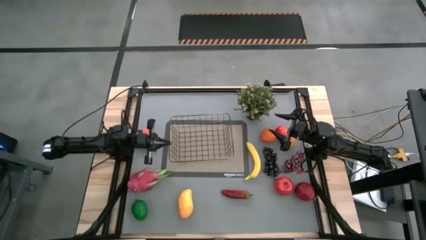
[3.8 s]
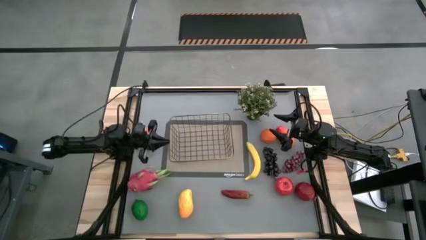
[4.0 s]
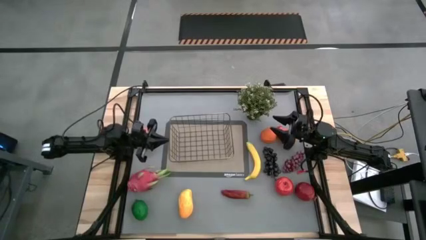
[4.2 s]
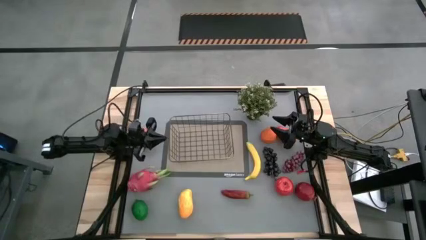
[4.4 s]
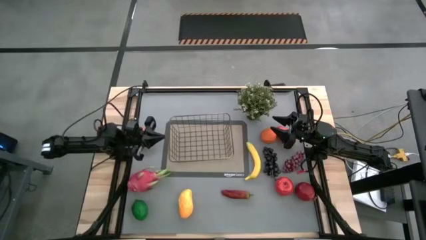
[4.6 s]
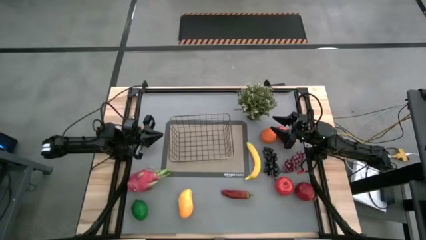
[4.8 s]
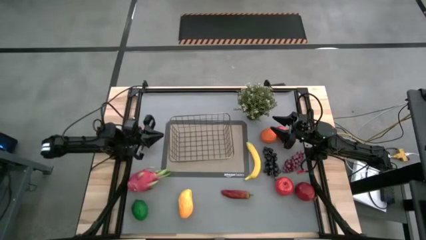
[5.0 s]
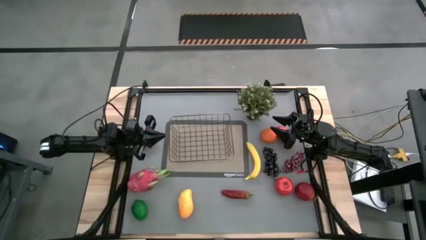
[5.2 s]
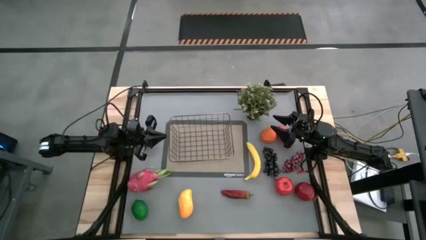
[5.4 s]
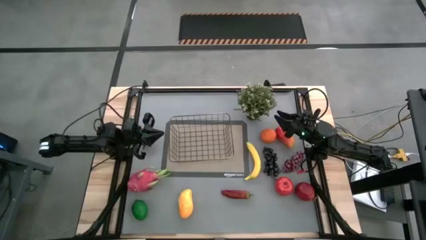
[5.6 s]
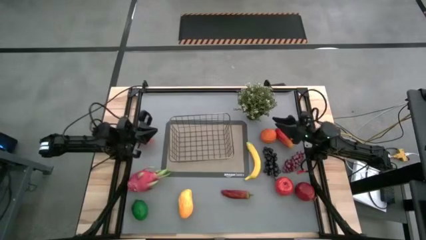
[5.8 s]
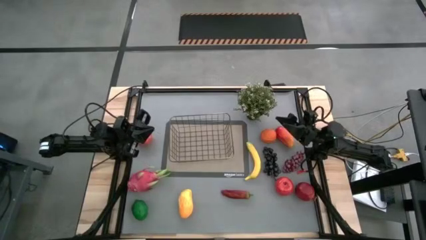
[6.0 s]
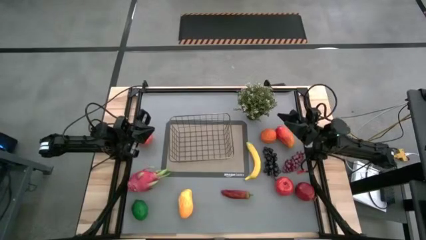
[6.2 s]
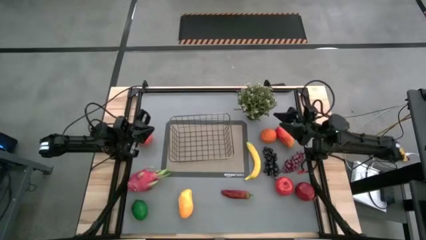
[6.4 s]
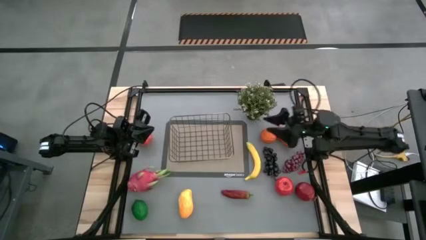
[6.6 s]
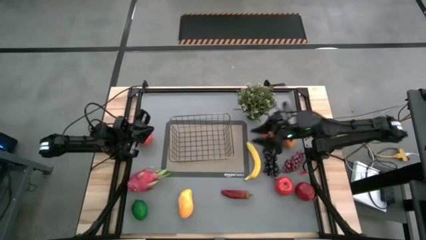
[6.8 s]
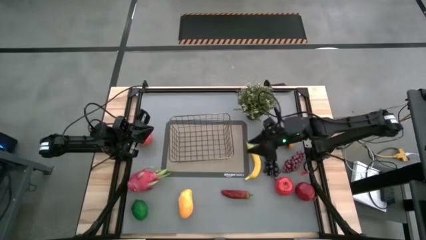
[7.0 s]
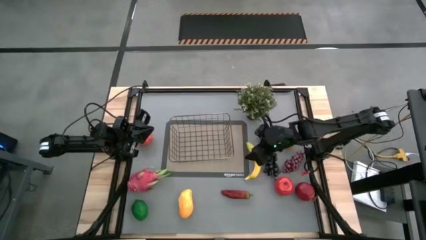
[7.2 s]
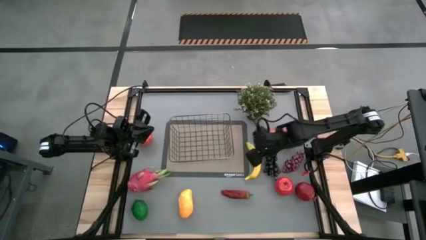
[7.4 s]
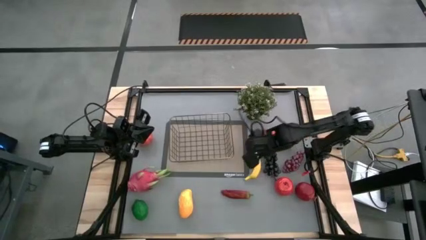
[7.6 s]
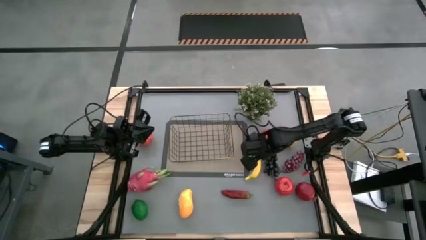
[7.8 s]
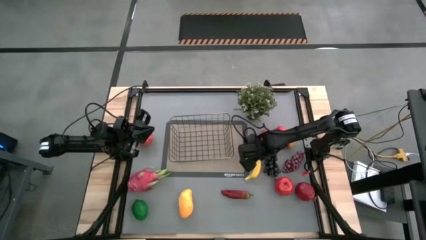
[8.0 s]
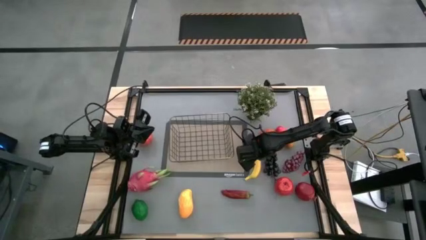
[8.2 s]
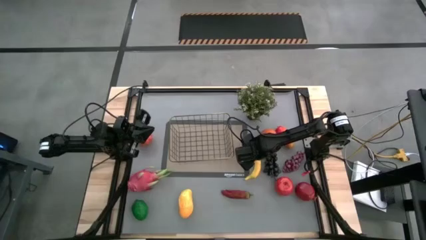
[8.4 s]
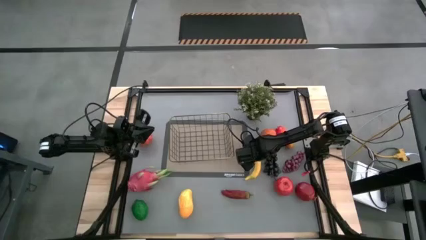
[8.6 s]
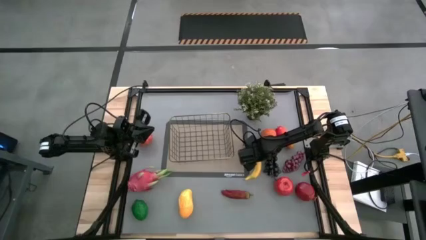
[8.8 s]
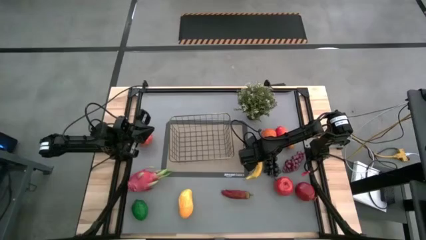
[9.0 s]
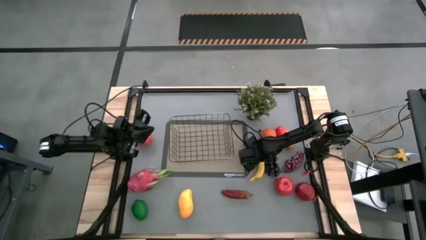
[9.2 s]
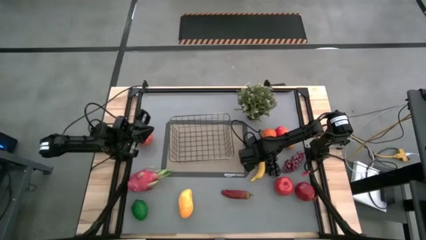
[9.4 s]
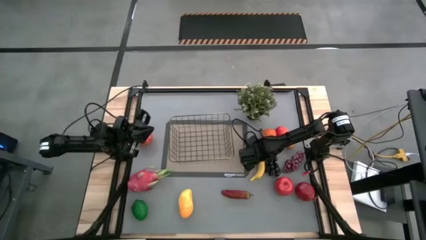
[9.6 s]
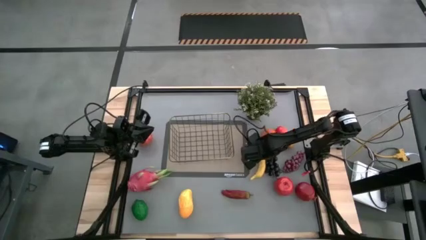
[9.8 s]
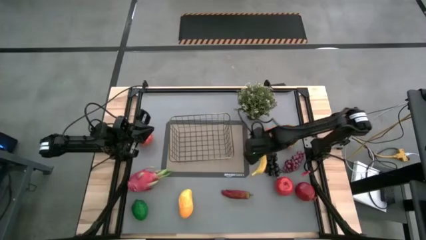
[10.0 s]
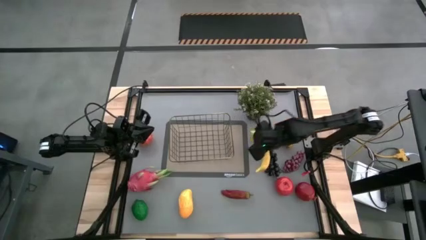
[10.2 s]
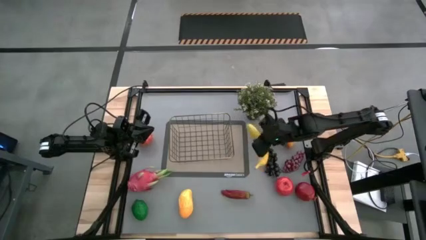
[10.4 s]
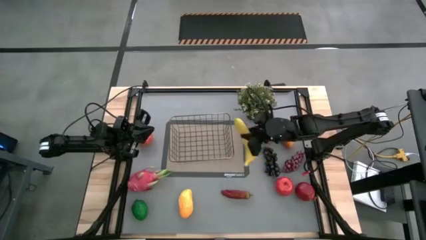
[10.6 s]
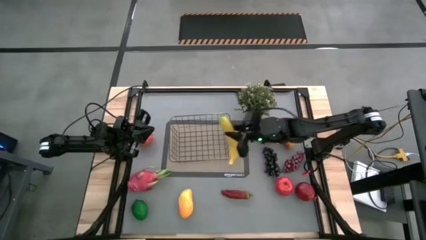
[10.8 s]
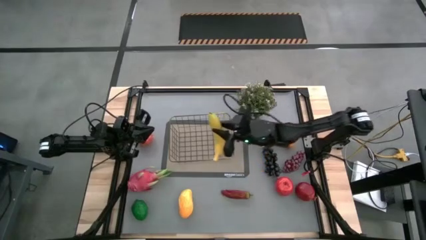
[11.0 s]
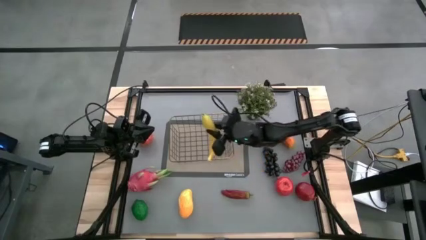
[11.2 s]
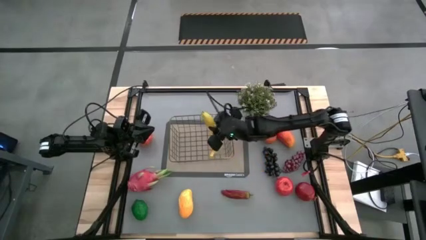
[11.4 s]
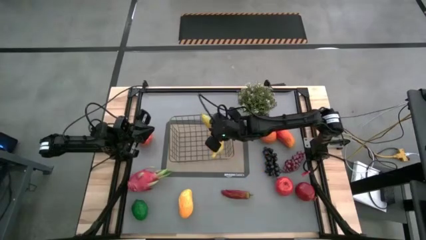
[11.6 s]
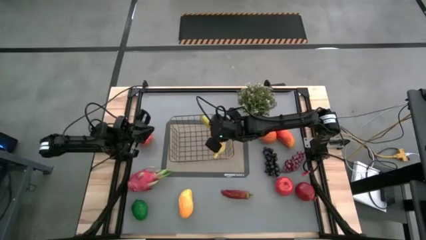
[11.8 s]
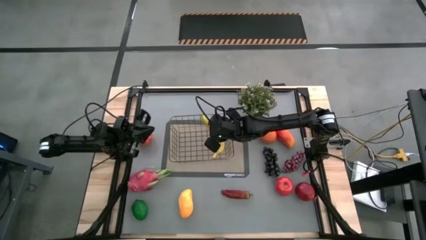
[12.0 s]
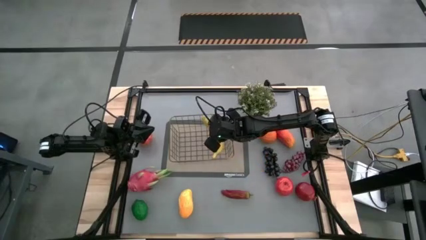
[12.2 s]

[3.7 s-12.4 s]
Task: Build produce basket
Put the banana into the wire basket

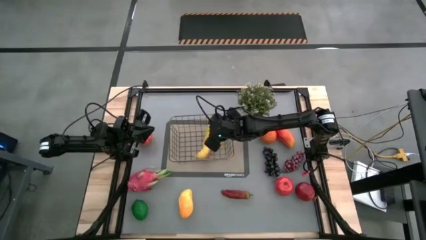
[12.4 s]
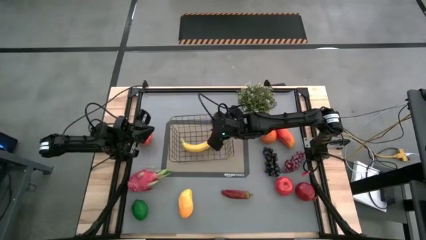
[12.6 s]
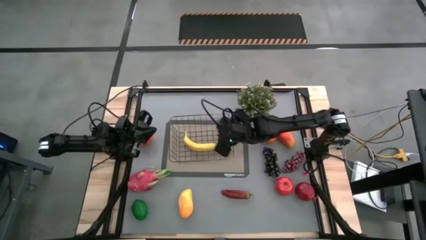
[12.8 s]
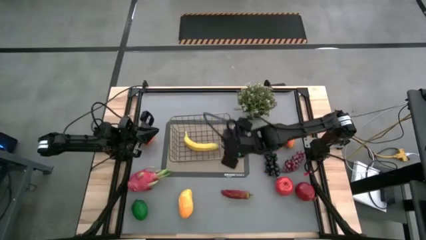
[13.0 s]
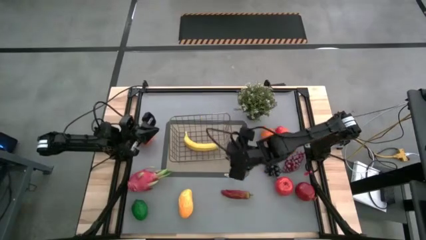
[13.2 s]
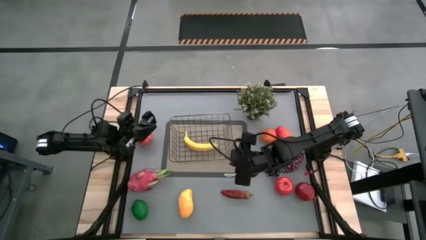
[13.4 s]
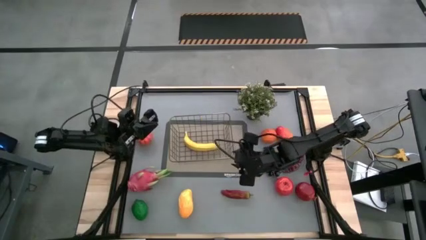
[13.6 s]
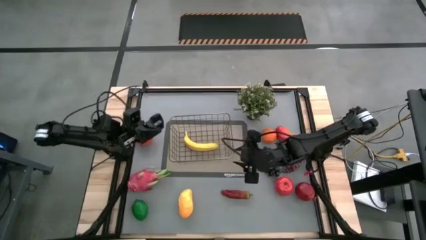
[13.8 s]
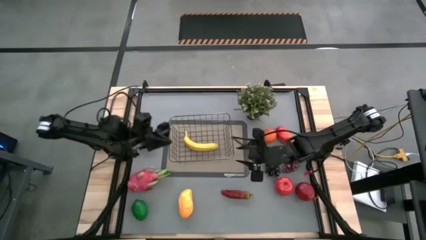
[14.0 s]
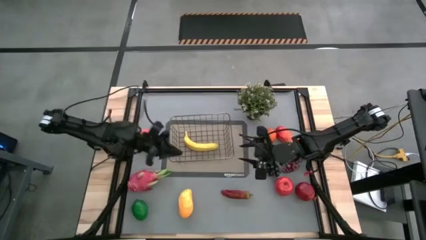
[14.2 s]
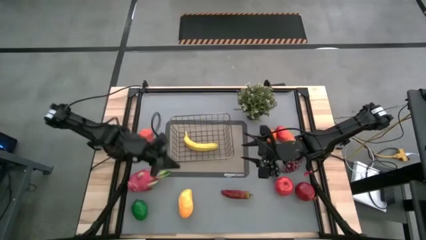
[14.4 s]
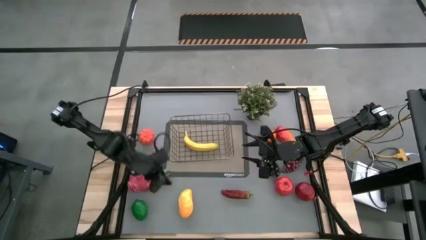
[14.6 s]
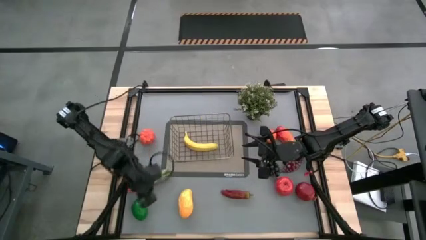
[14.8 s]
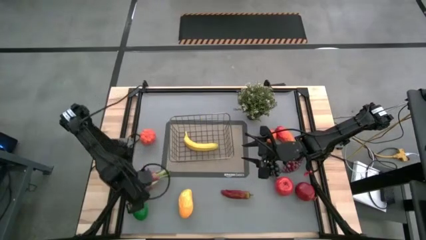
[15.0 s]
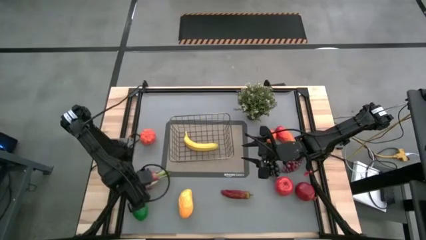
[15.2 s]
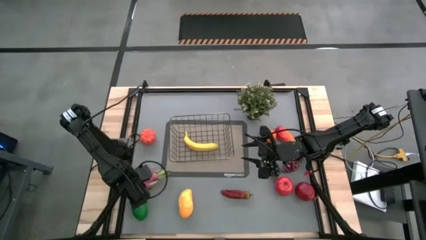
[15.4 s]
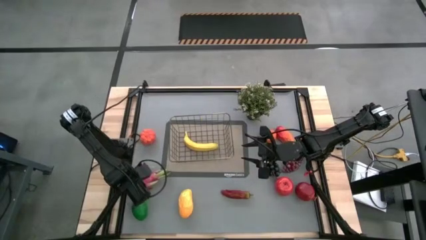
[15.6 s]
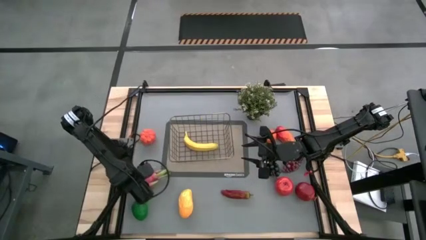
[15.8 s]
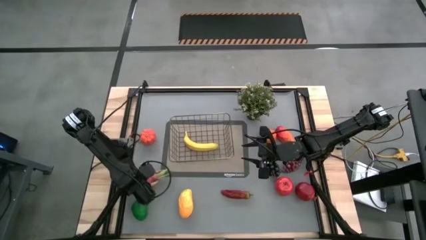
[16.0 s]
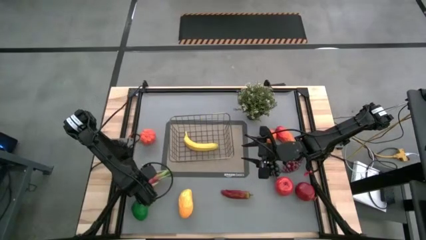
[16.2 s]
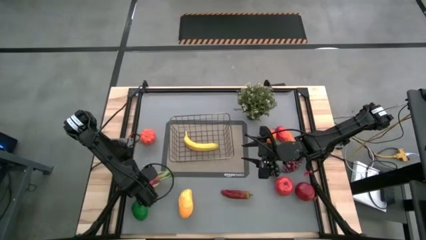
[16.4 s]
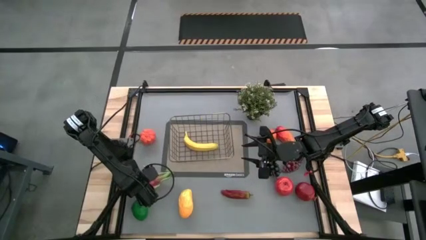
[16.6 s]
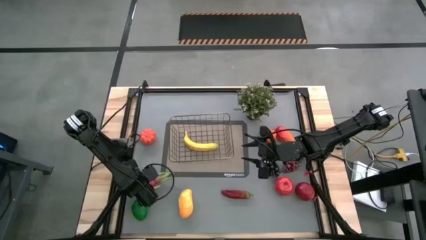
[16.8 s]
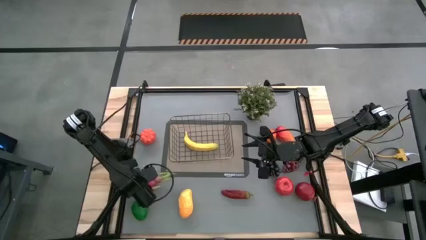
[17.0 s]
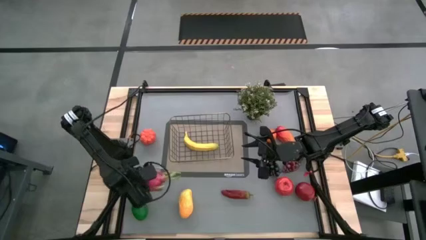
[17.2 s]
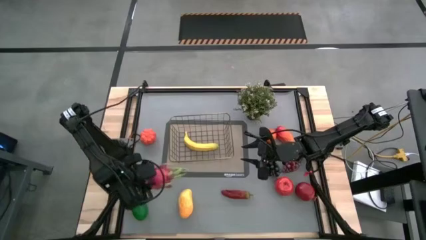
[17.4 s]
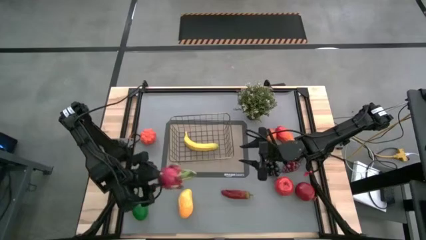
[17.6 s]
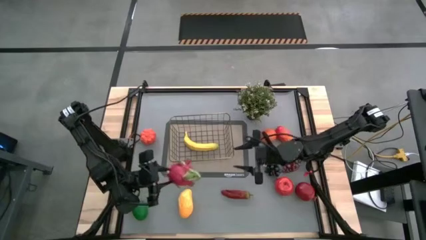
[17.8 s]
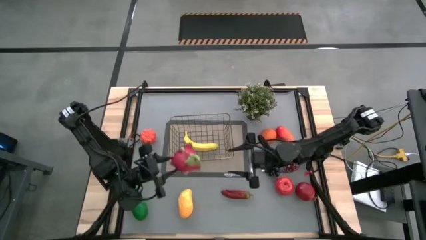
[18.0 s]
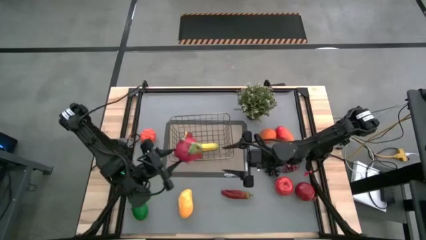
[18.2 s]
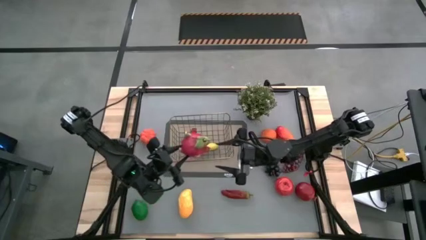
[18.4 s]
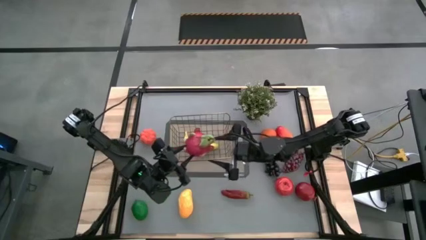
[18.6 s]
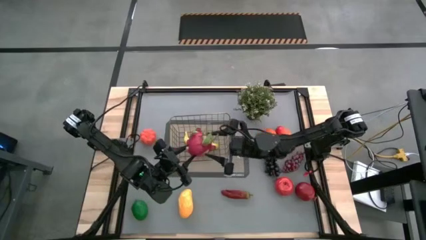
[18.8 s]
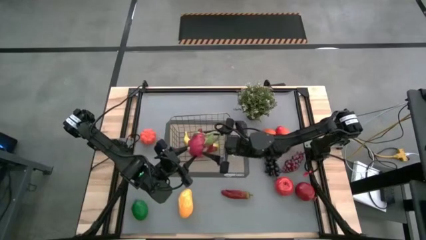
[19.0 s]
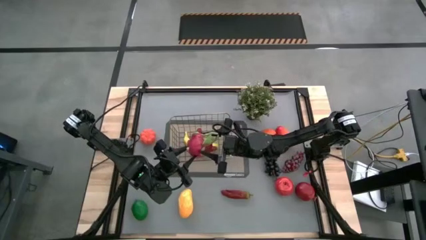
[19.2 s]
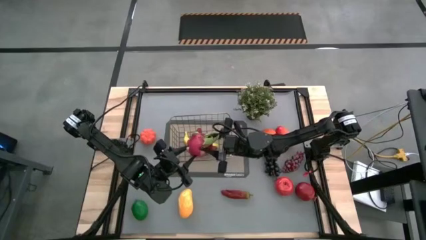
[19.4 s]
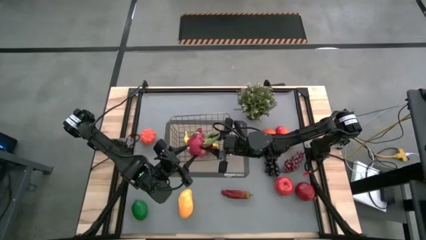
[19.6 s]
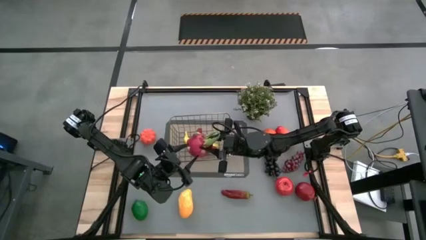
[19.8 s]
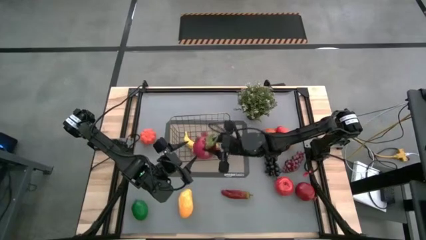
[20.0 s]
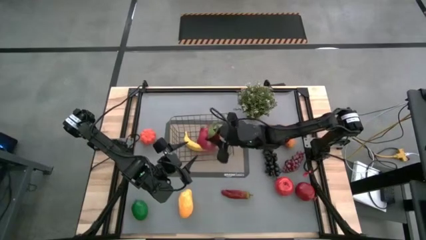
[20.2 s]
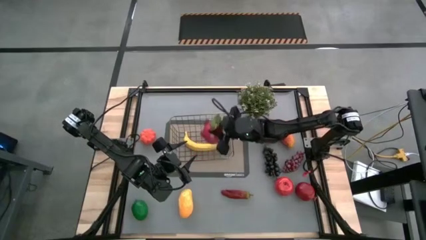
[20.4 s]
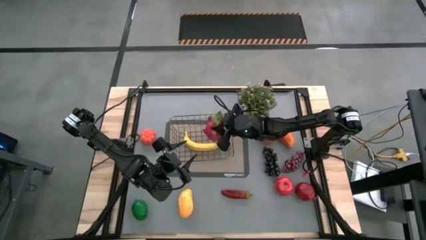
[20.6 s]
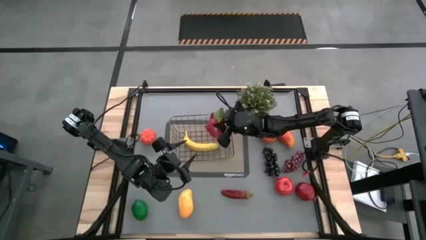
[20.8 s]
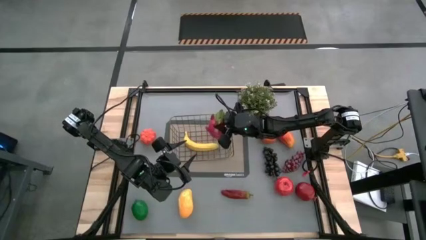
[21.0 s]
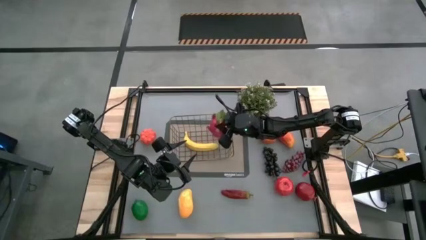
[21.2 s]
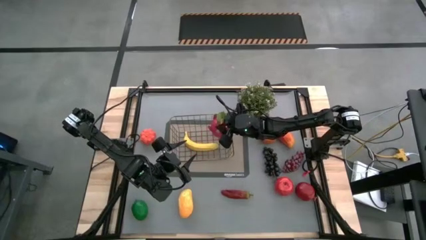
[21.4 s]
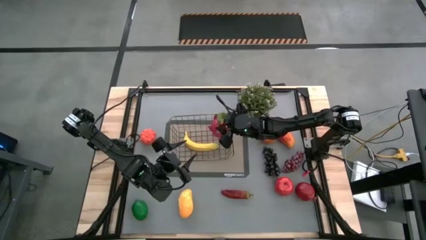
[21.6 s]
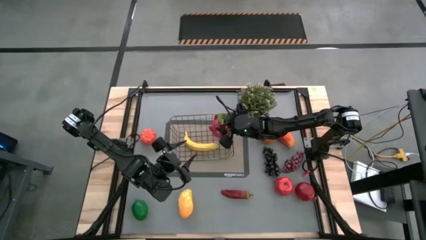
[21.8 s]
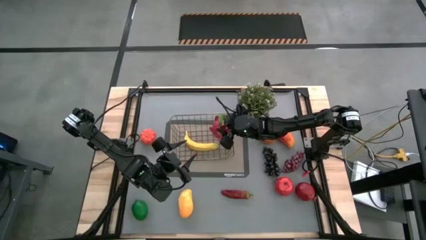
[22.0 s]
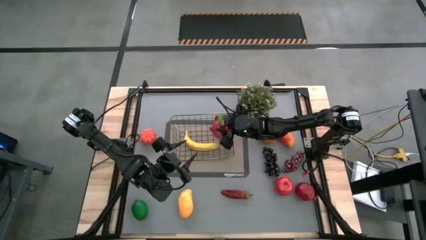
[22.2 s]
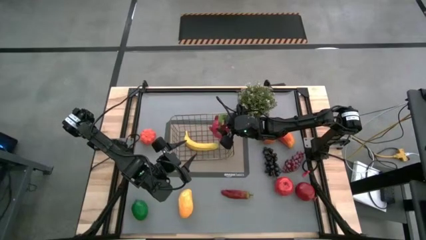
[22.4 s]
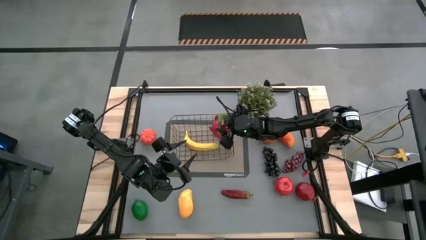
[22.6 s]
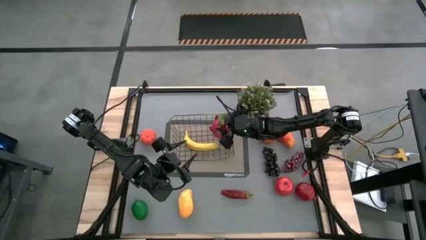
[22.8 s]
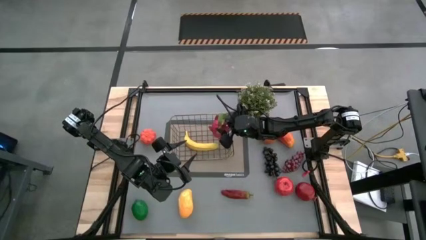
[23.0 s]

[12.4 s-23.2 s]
Put the dragon fruit into the wire basket
